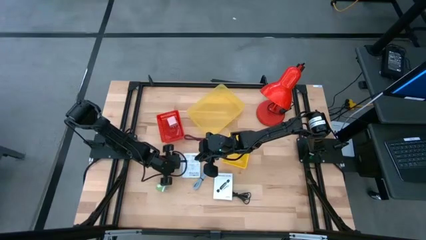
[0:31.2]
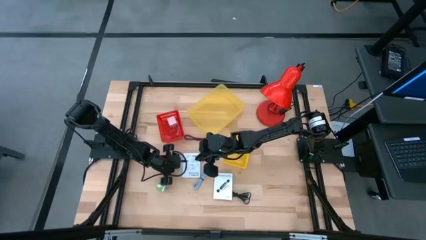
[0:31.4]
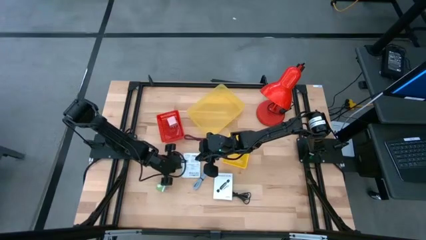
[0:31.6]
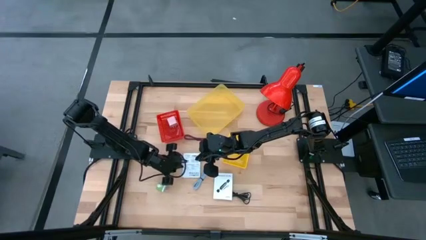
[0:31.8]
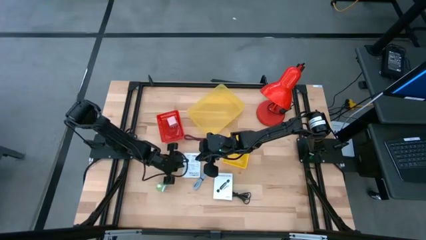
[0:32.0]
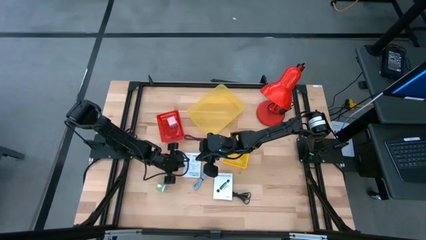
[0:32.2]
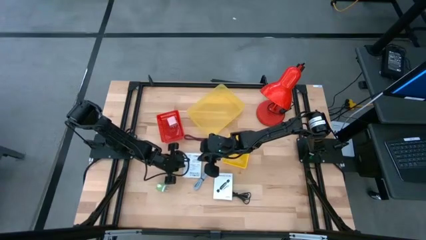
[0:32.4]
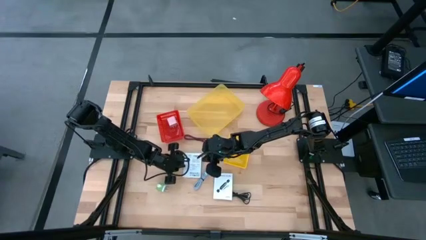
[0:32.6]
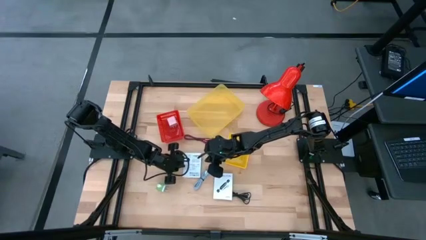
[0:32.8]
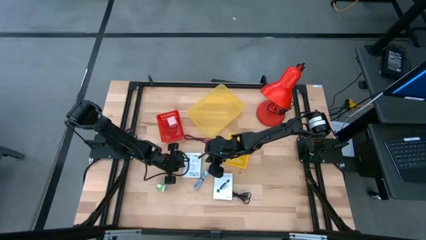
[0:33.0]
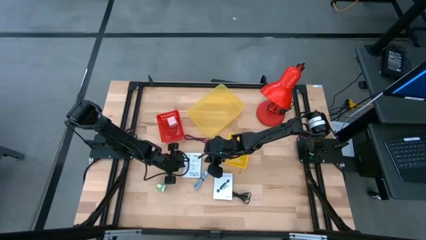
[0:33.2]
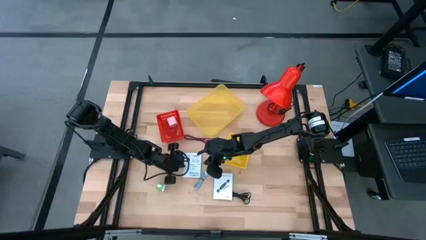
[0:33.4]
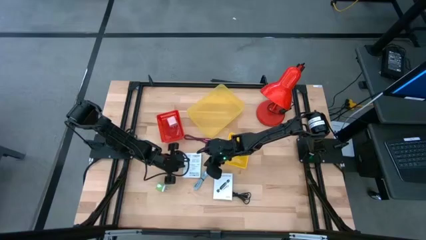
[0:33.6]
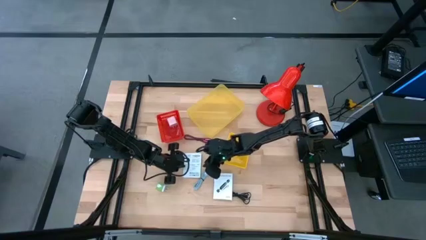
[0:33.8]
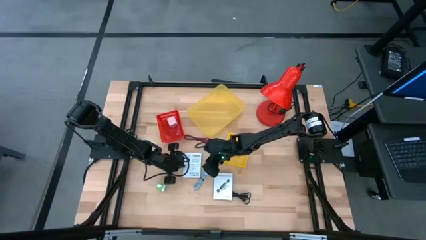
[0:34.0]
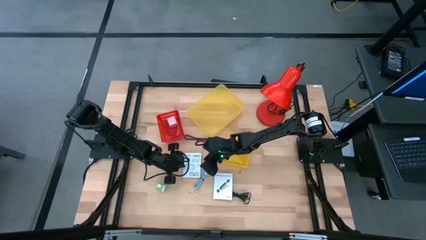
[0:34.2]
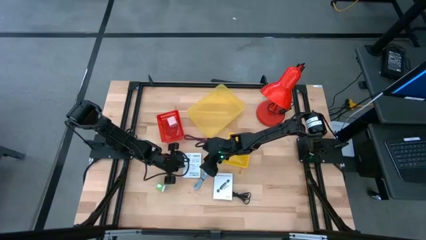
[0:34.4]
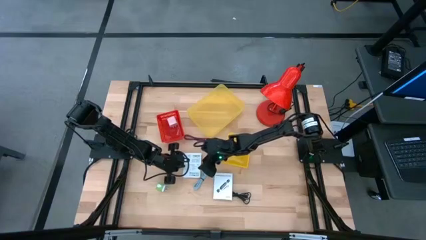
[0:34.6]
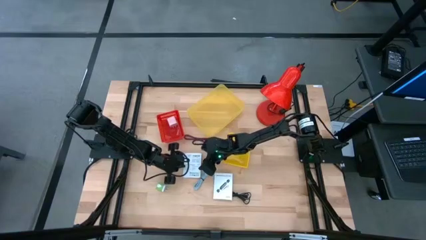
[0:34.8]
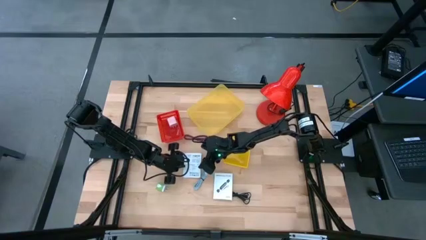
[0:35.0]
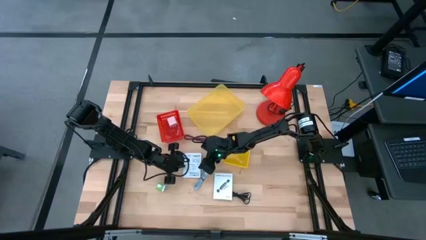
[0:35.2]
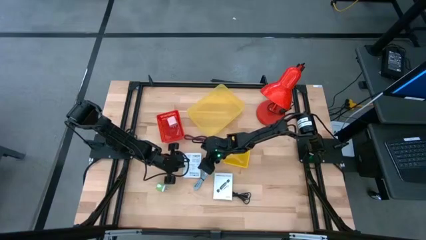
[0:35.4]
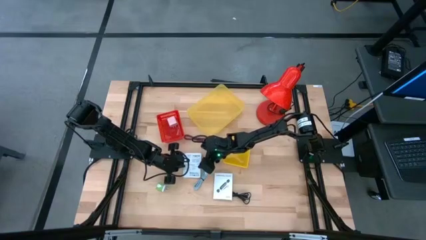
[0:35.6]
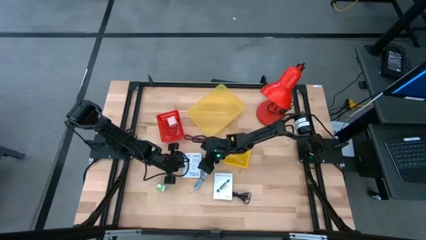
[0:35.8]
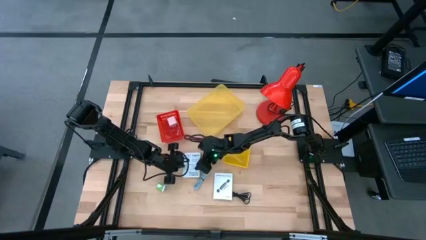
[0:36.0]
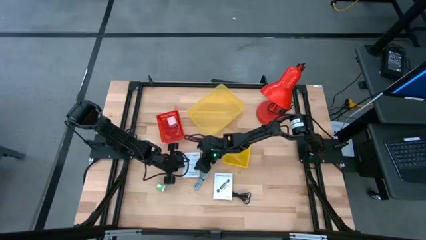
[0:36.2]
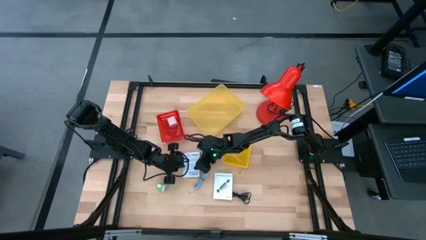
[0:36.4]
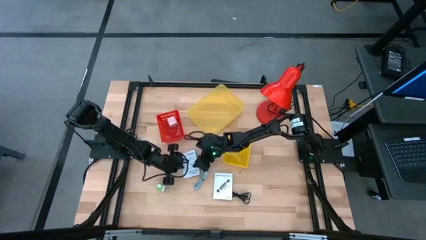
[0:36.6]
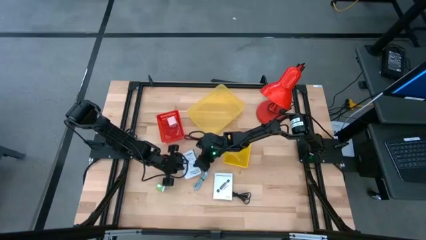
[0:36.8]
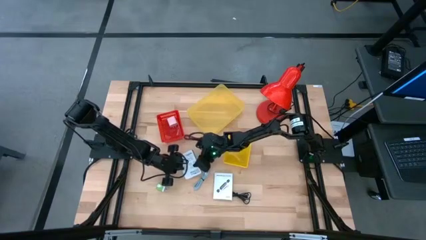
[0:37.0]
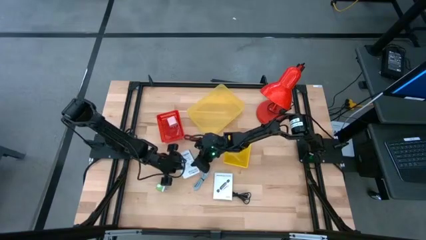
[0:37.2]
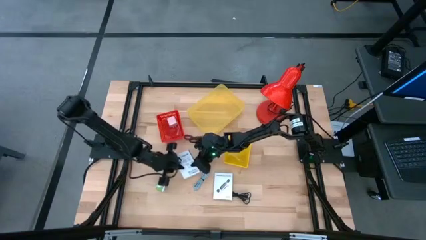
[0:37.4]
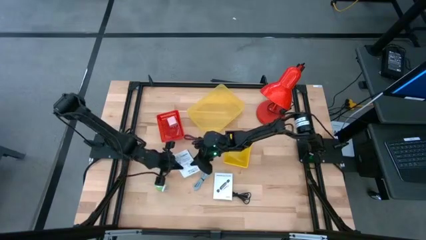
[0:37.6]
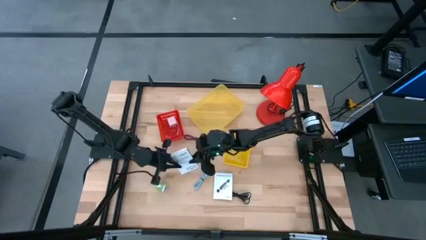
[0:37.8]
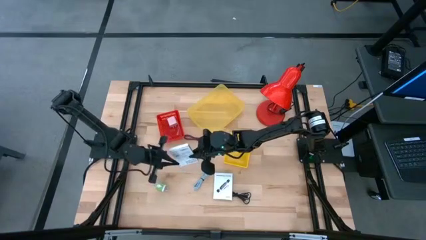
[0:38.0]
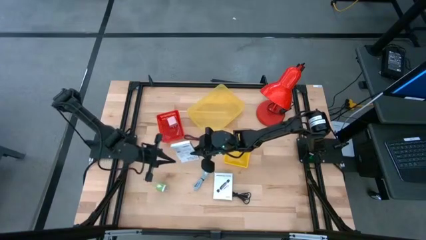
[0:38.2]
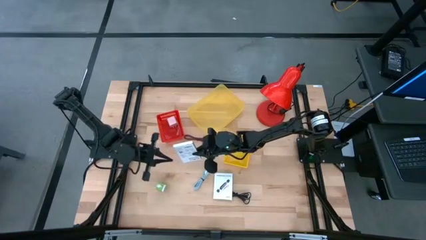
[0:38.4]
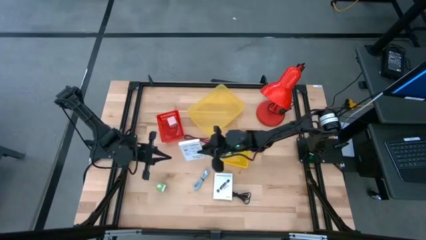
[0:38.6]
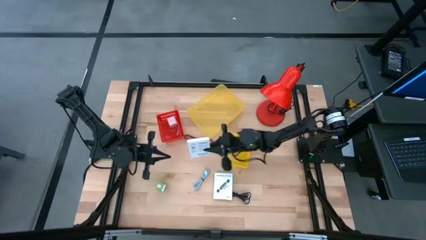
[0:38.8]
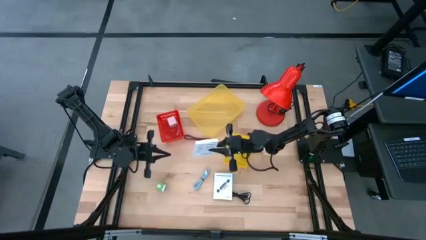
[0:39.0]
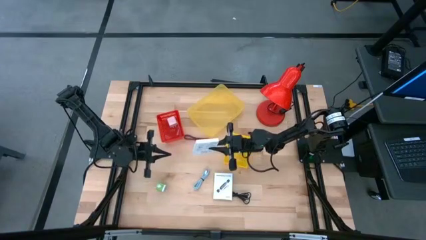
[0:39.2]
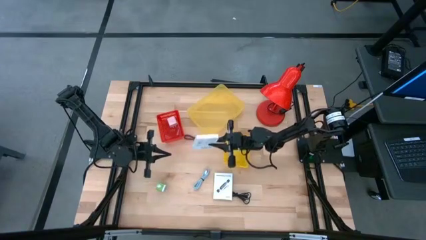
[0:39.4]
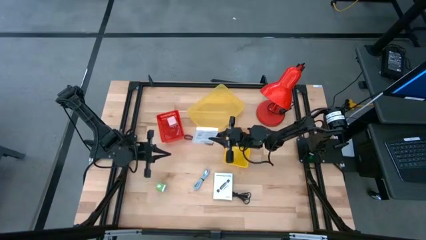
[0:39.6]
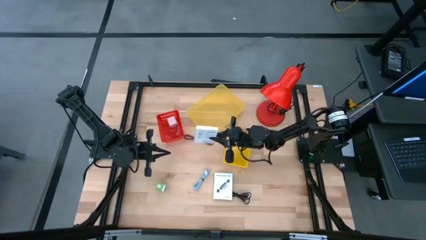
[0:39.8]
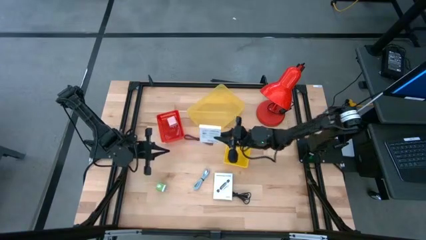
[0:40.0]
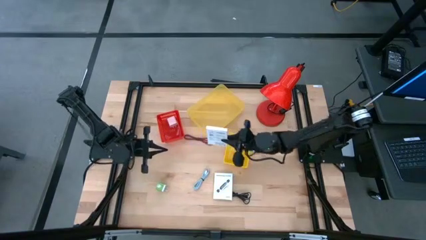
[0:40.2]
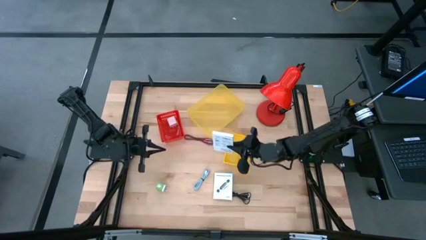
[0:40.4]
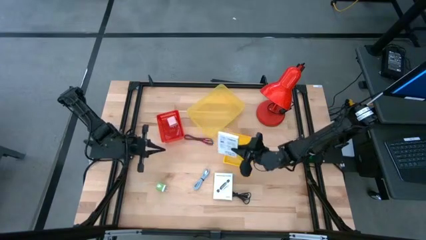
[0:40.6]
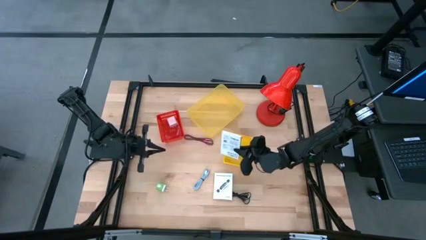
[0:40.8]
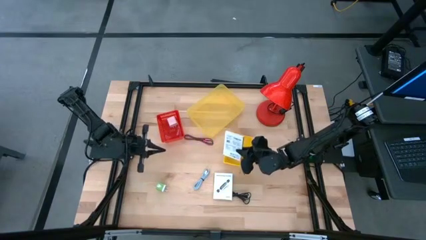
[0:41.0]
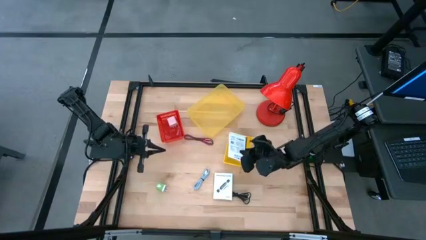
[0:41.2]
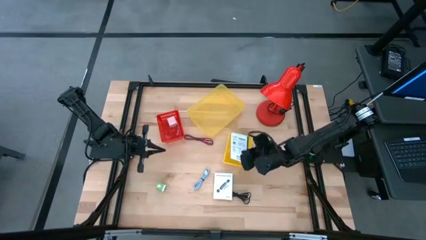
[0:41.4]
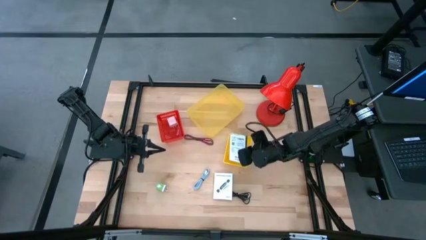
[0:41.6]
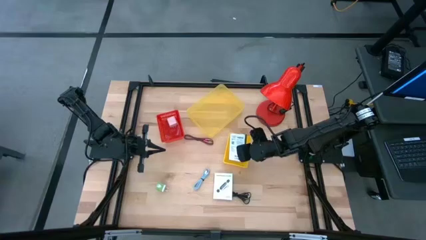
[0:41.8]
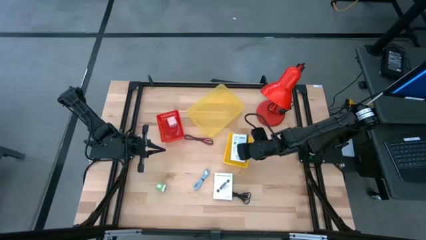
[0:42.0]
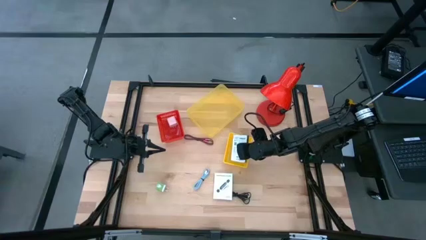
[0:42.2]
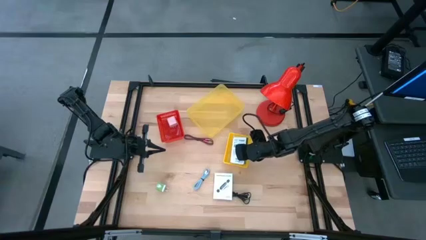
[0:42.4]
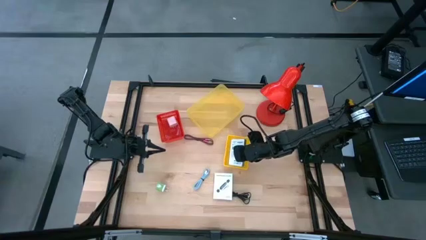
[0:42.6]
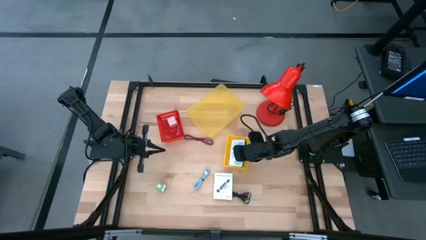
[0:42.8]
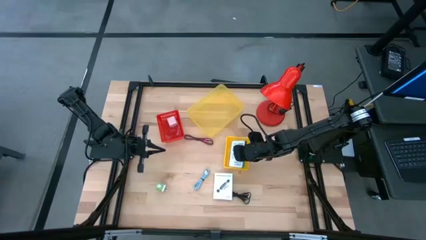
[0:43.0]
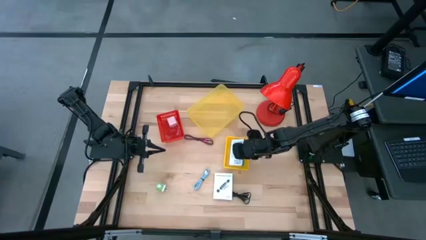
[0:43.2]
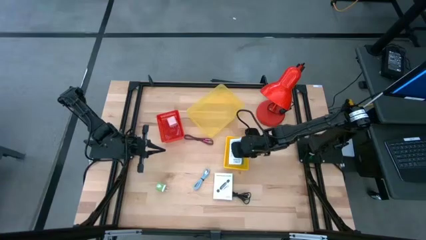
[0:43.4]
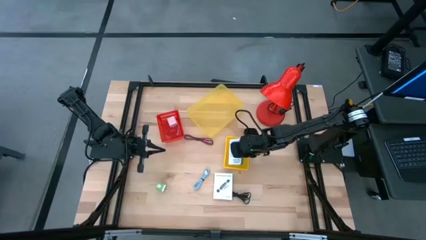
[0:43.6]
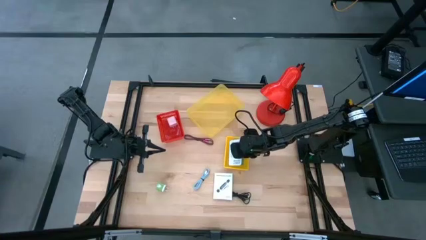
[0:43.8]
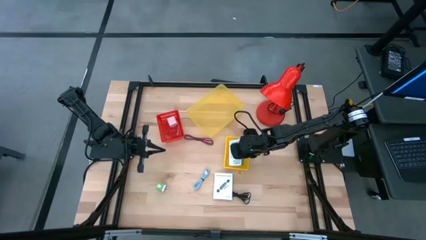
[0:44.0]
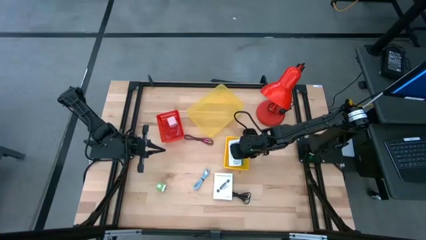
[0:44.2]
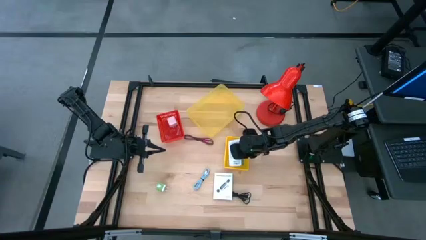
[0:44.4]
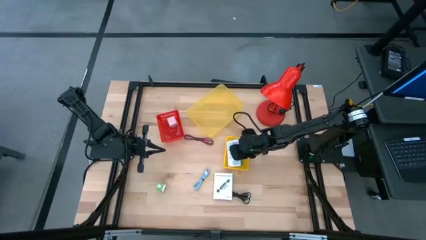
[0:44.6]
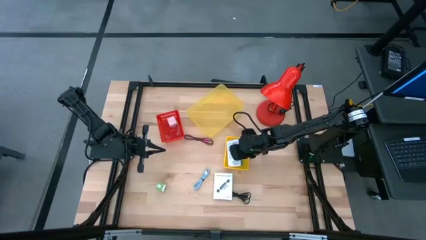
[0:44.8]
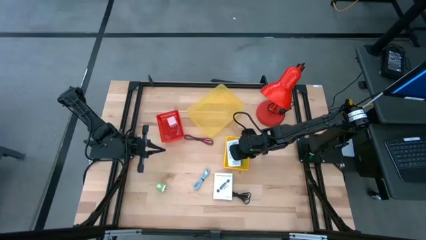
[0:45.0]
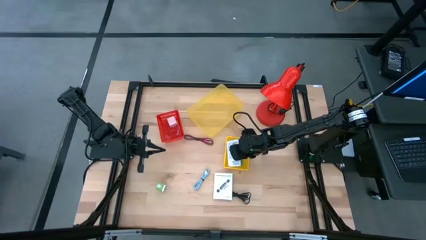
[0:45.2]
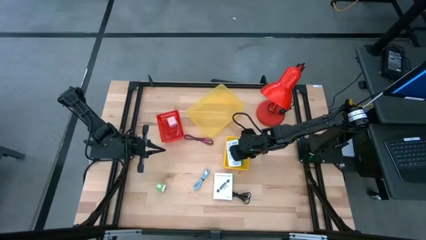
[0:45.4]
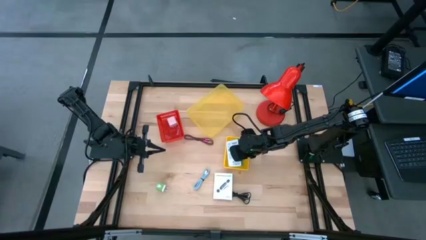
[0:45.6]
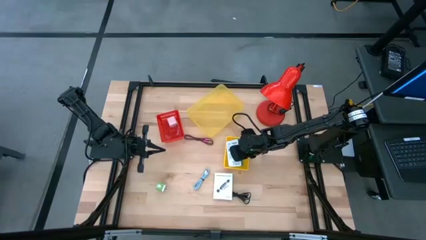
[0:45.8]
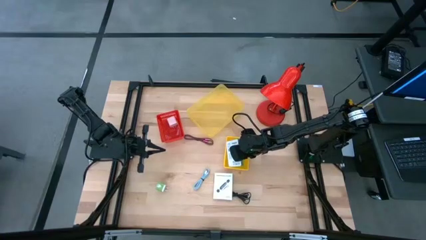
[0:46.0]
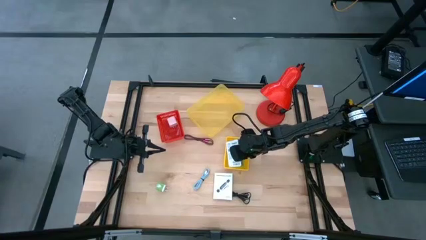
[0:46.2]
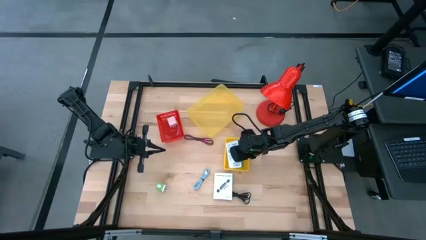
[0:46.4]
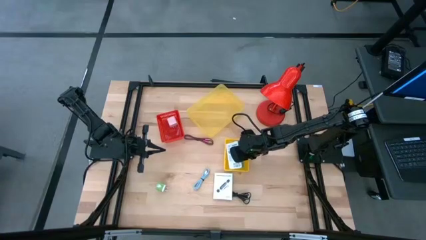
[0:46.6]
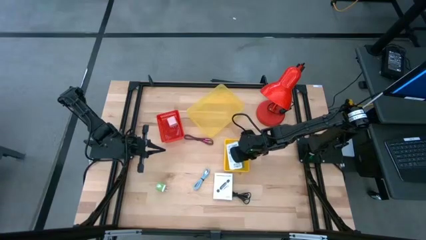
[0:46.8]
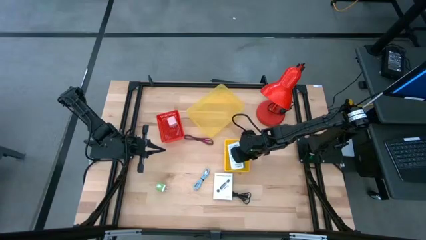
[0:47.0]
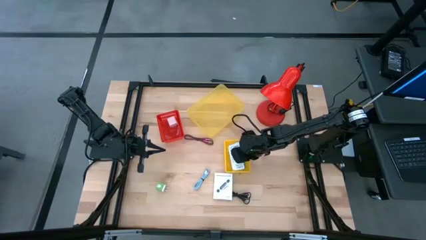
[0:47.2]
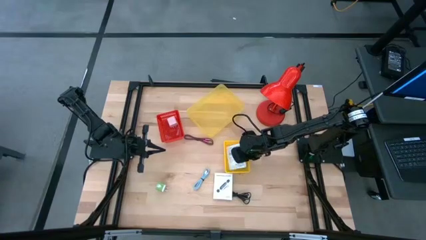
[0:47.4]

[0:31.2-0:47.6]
Task: Pick and place items into bin
Put the left white box into the small yellow bin
